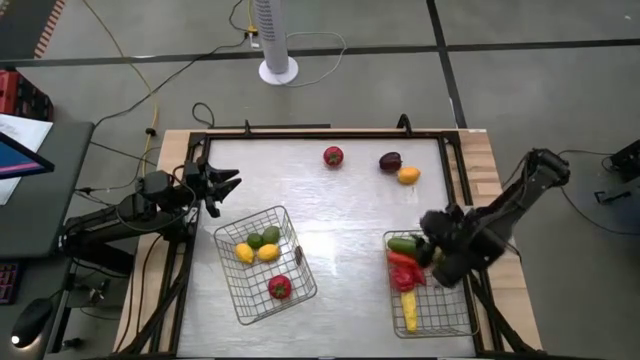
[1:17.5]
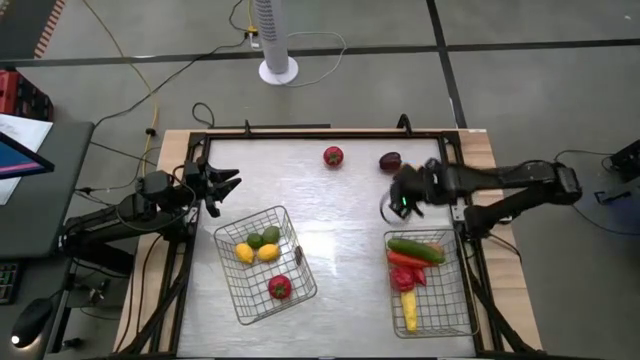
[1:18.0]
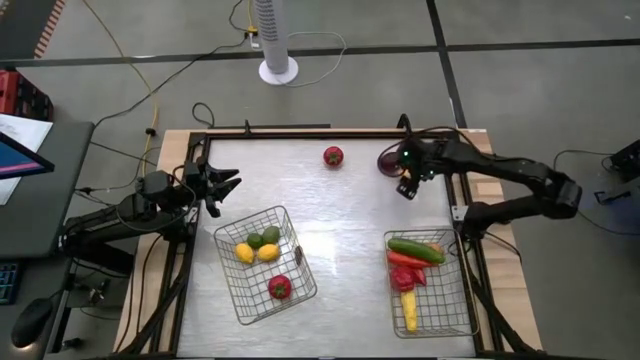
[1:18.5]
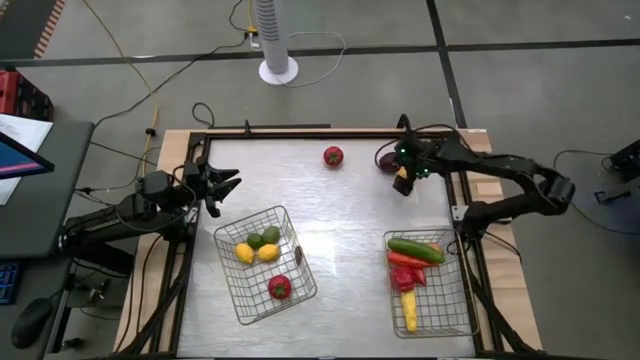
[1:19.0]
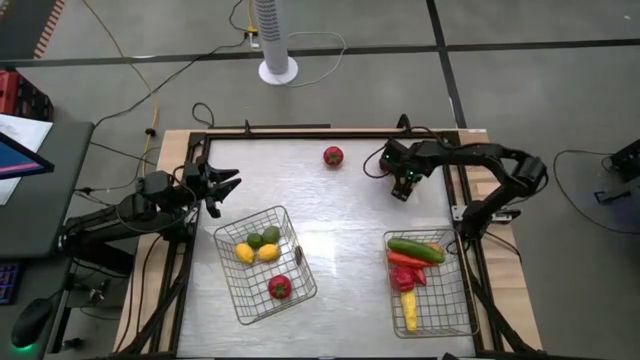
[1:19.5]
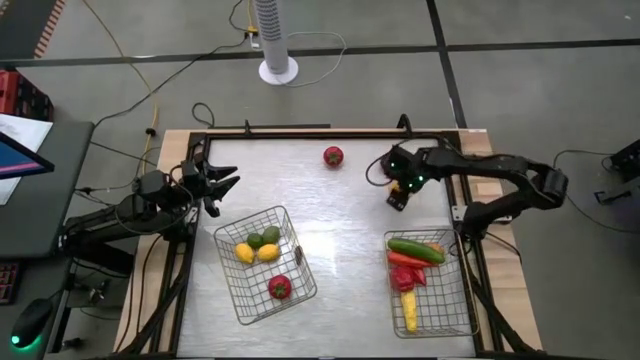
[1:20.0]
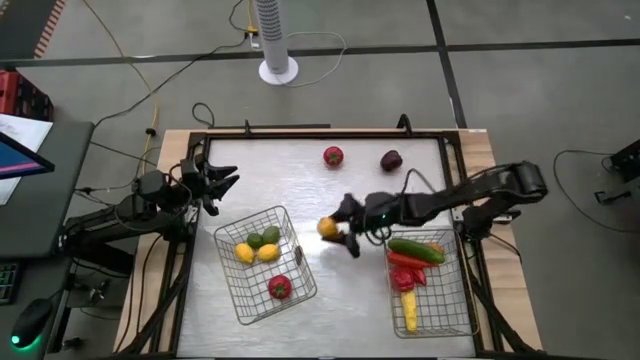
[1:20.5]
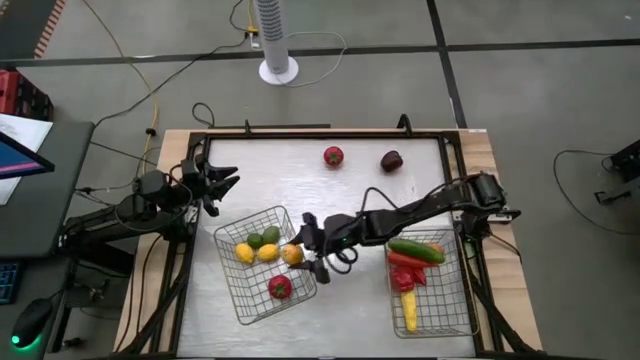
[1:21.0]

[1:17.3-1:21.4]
Task: Sort produce into baskets
Put the yellow lemon into the left wire basket

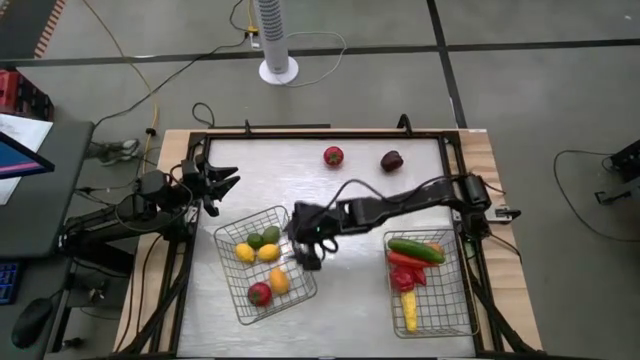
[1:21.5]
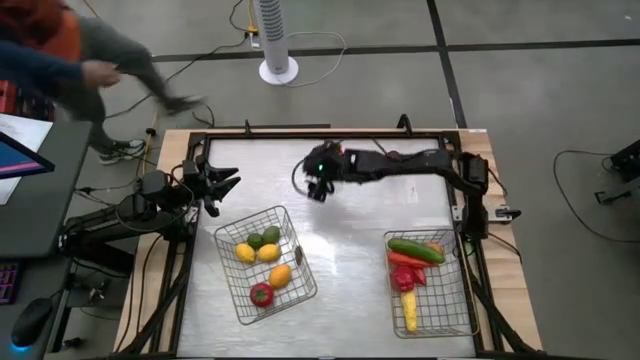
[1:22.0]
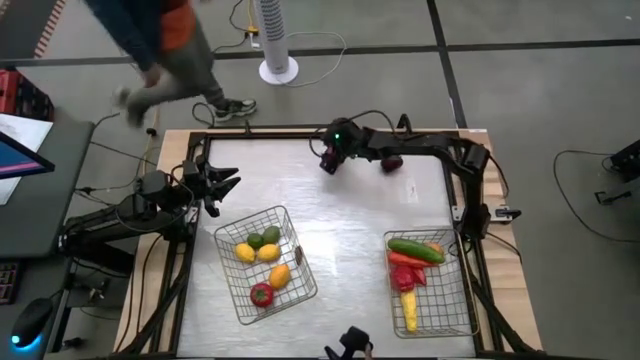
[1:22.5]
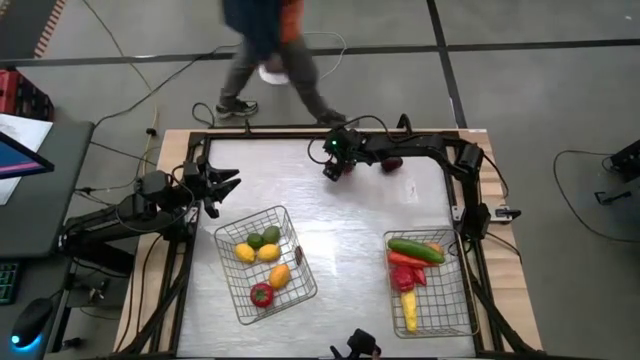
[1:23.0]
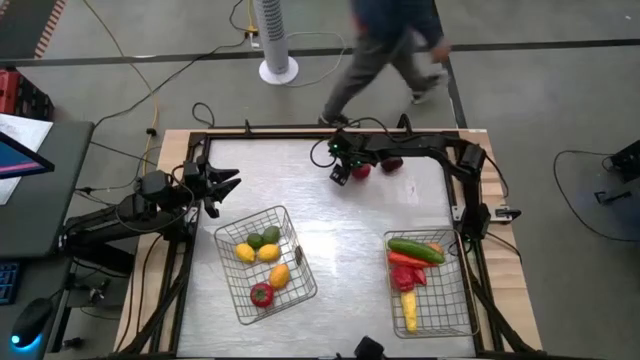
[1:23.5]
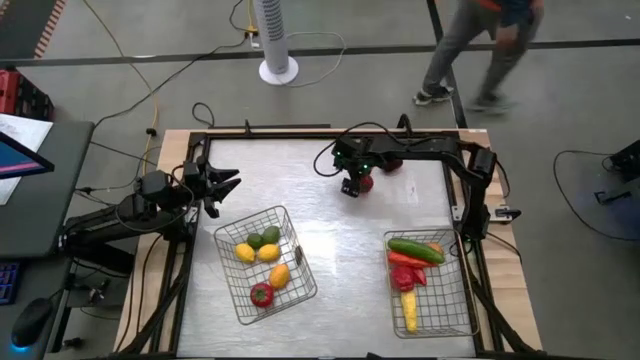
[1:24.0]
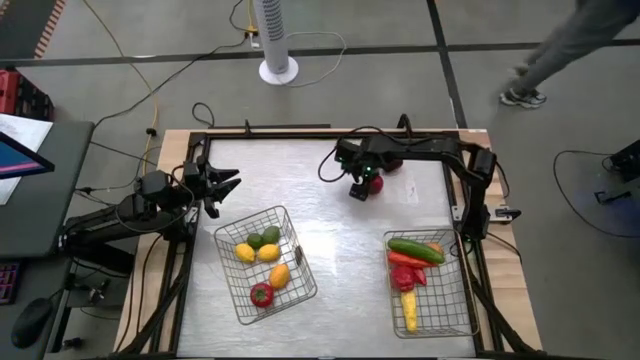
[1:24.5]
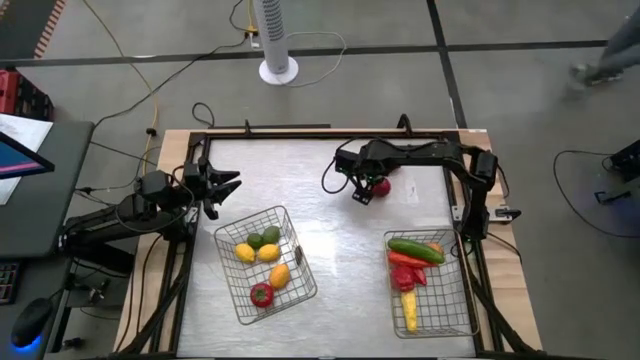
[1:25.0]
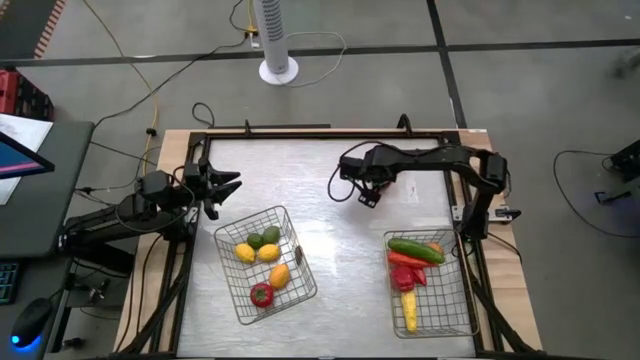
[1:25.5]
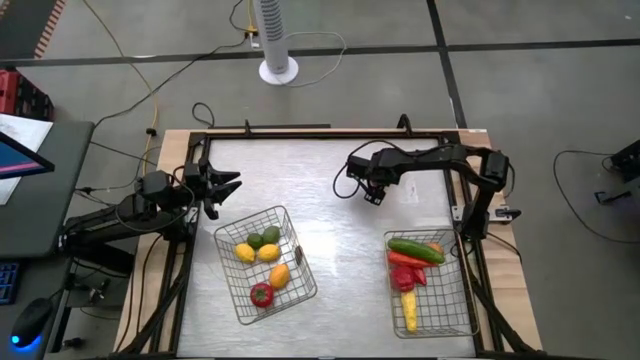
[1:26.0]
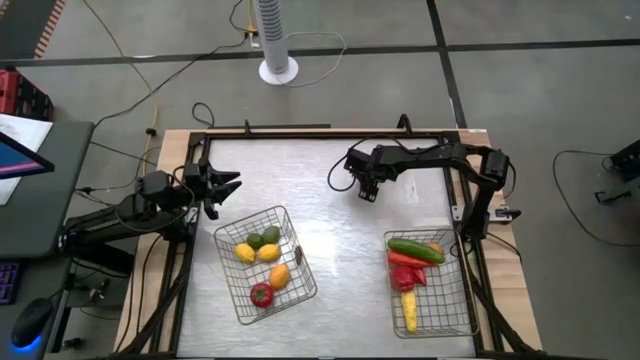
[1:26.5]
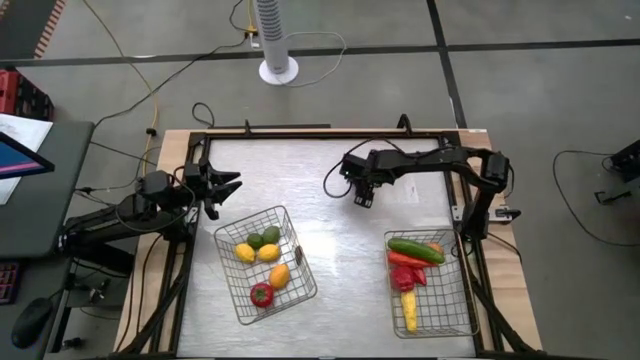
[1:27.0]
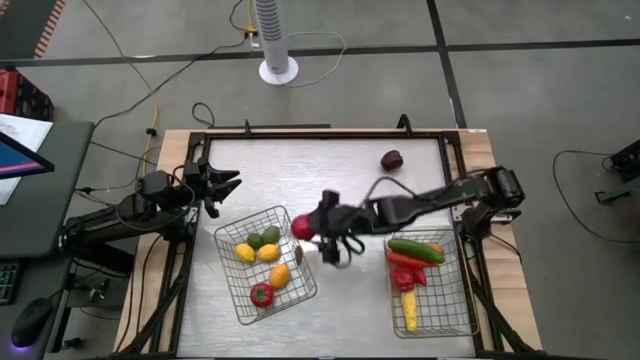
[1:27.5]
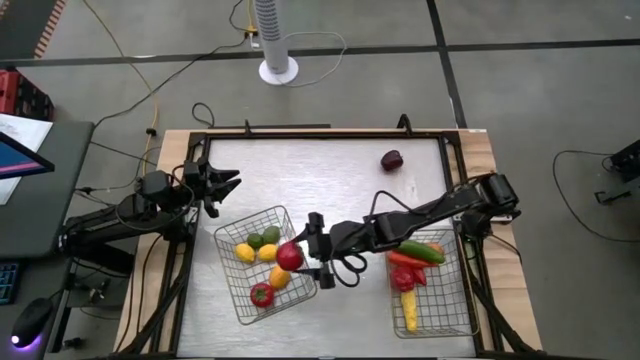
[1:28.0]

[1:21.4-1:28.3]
Put the red tomato into the left wire basket

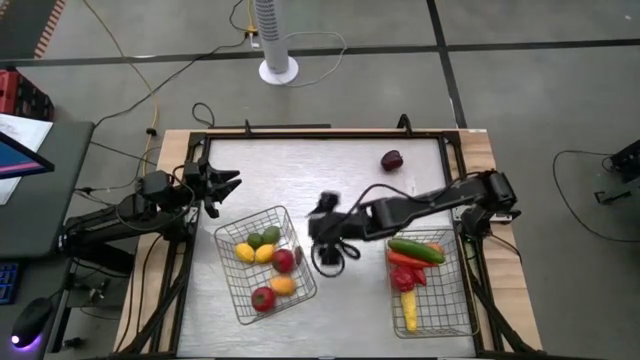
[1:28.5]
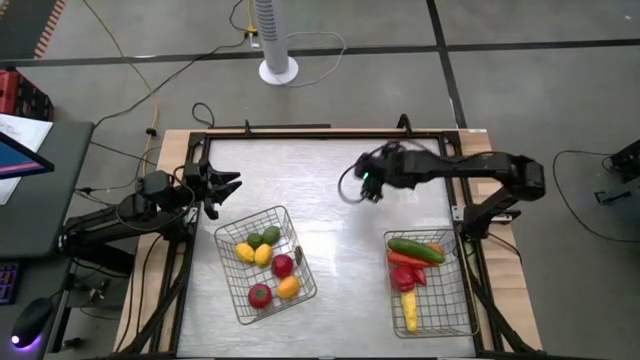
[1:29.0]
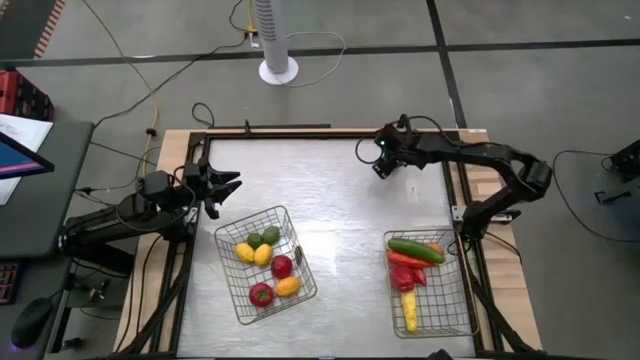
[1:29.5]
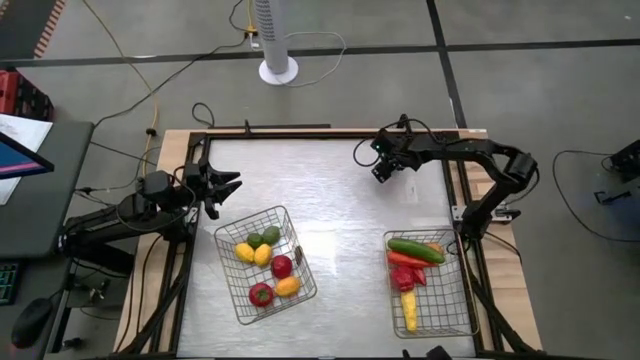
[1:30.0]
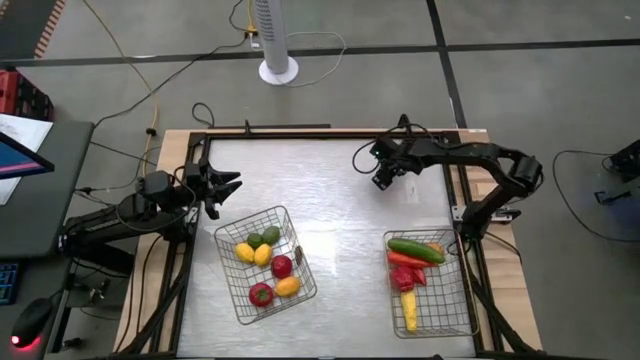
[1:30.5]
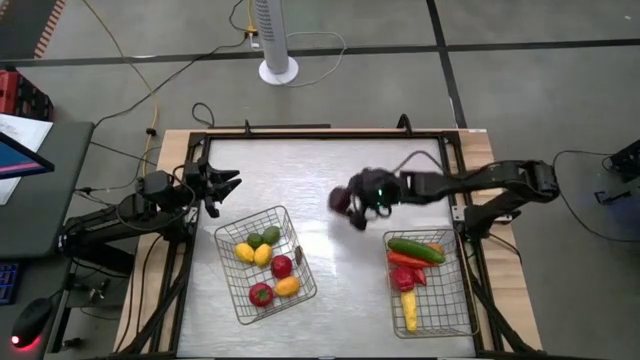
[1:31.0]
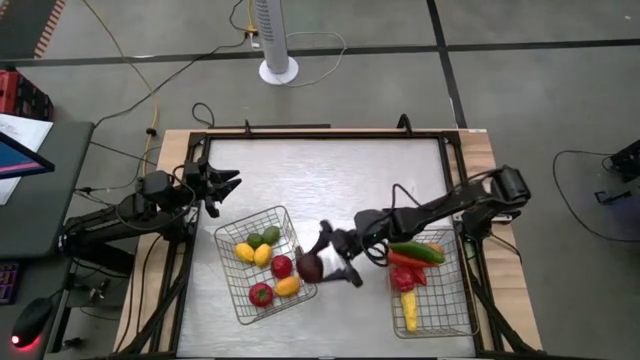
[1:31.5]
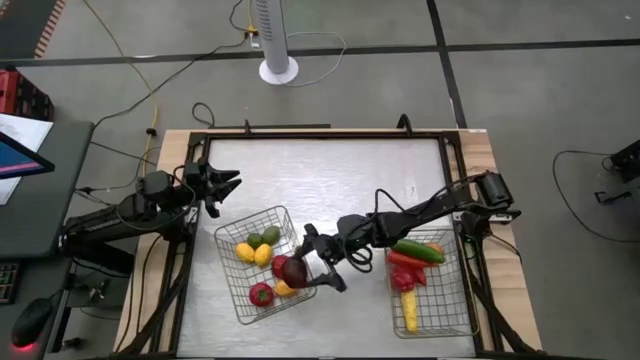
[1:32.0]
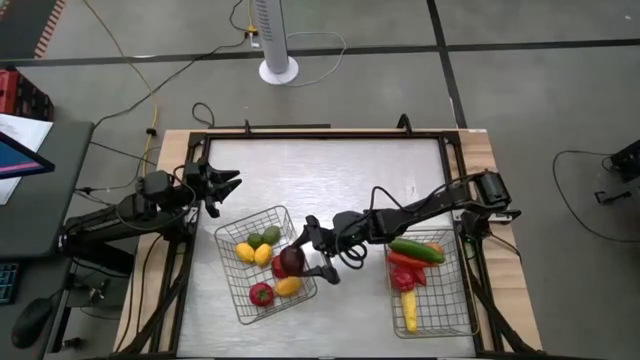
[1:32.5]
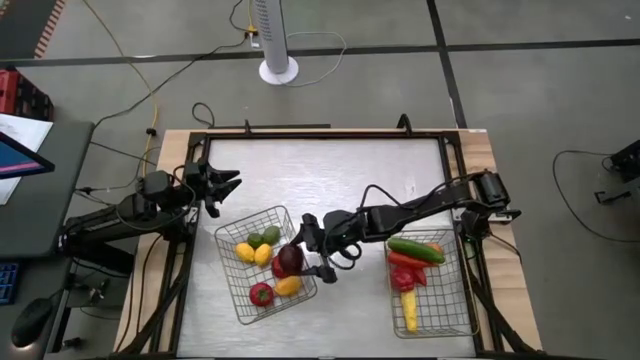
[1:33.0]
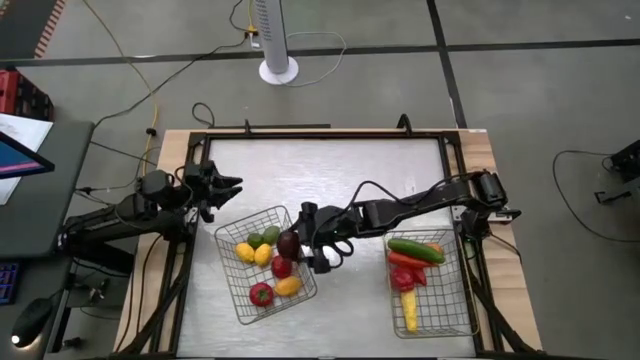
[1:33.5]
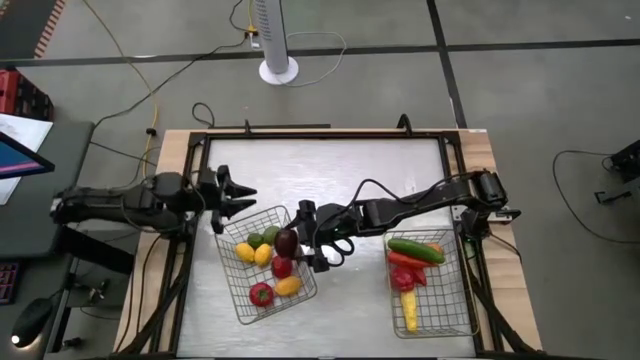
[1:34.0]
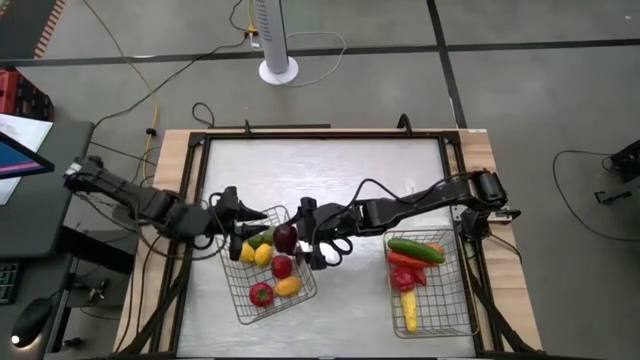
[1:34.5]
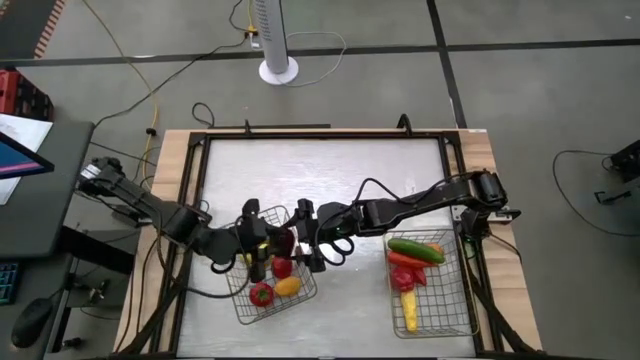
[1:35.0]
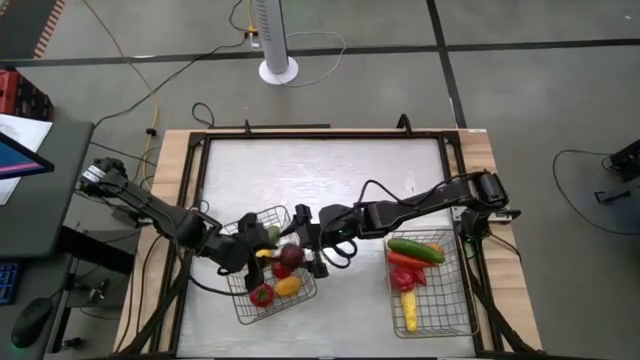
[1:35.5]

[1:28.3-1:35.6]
Put the dark red apple into the left wire basket

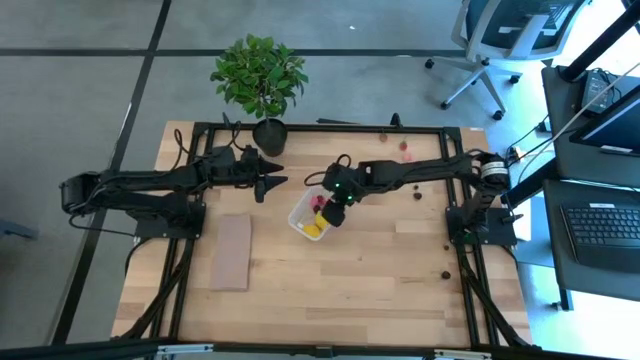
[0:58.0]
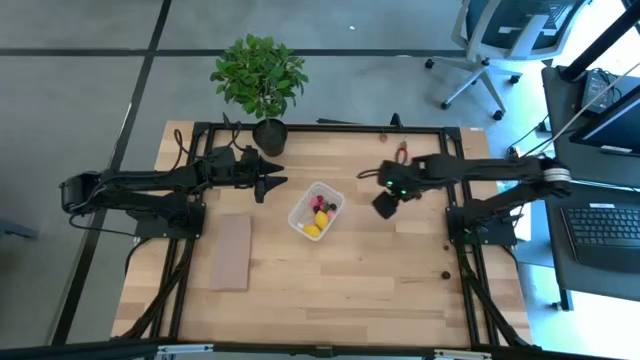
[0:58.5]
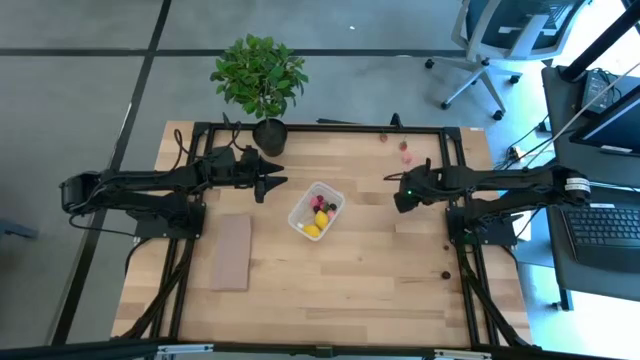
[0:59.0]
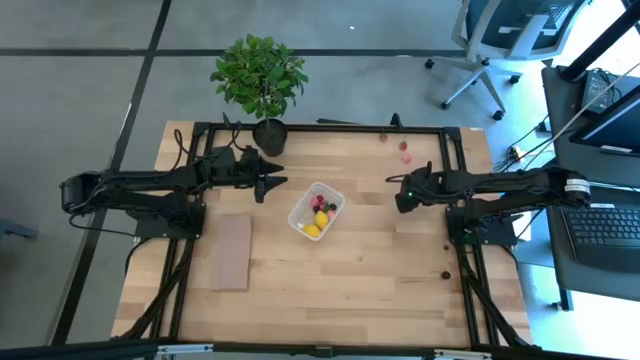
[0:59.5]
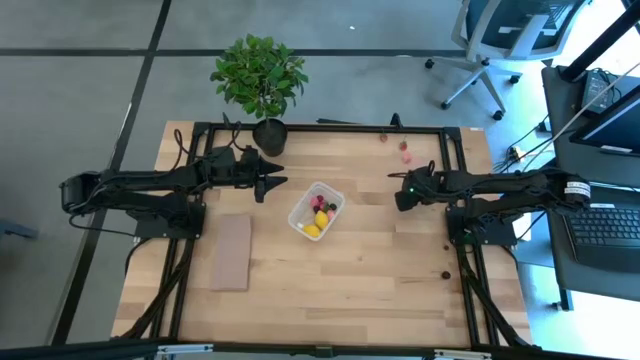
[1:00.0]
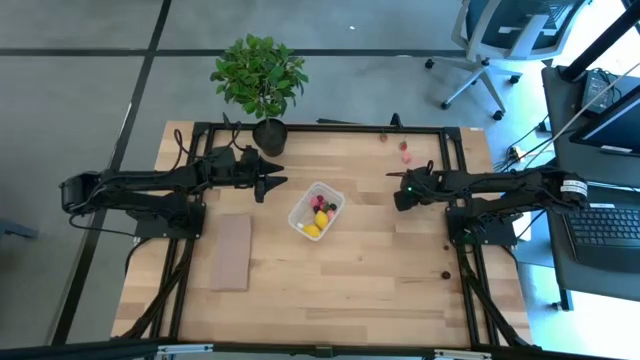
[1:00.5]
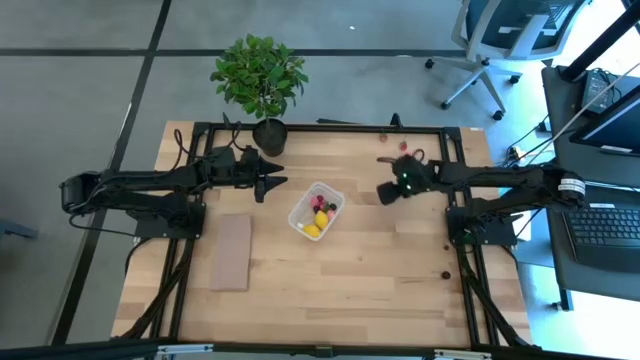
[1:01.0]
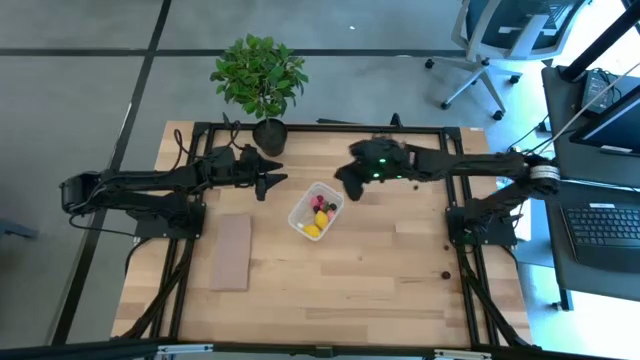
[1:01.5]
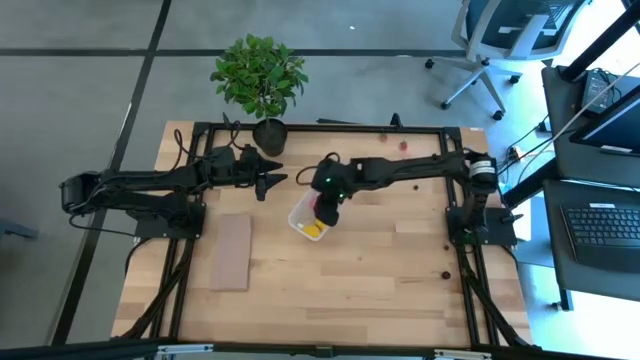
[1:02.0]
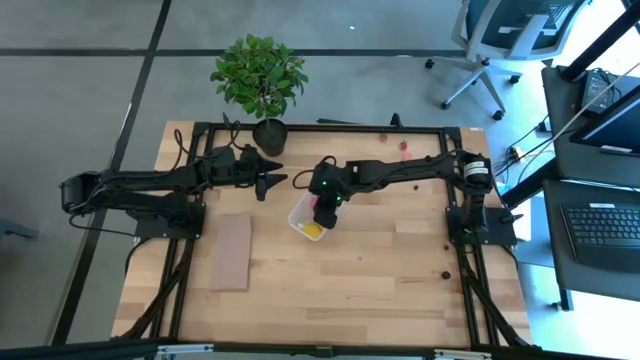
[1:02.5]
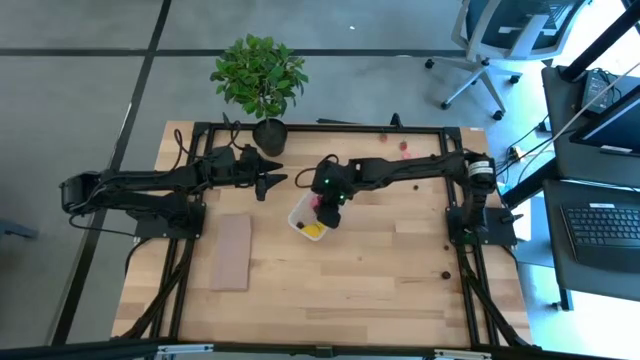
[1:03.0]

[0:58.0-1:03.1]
Task: Pick and placing Produce into tupperware
Put the blackberry into the transparent bin
